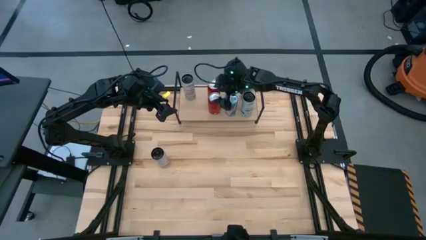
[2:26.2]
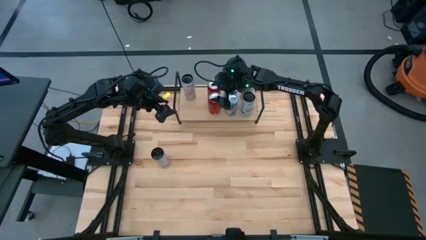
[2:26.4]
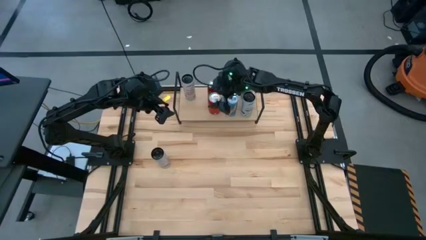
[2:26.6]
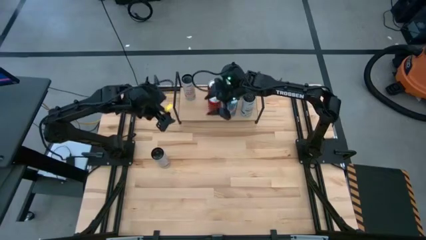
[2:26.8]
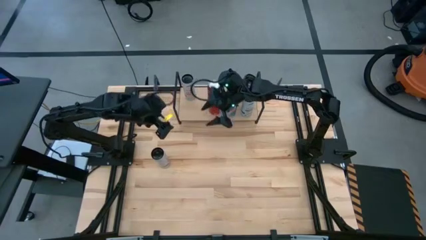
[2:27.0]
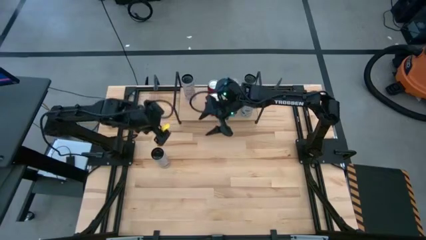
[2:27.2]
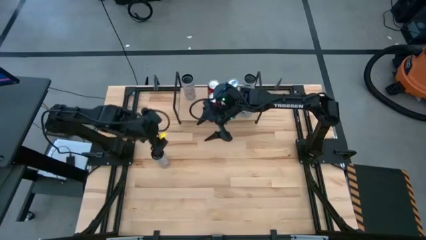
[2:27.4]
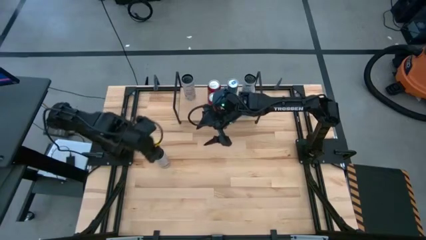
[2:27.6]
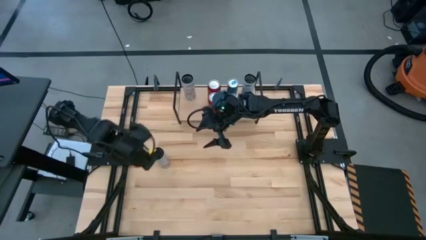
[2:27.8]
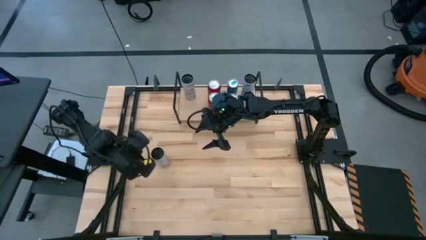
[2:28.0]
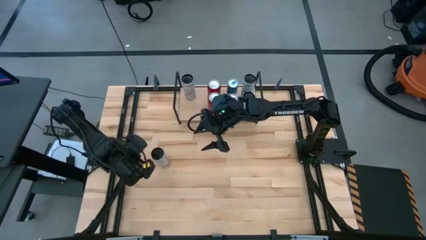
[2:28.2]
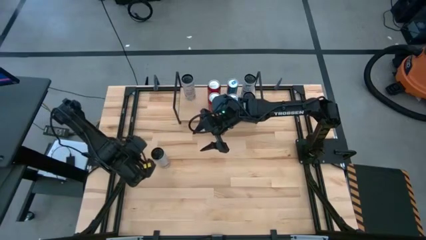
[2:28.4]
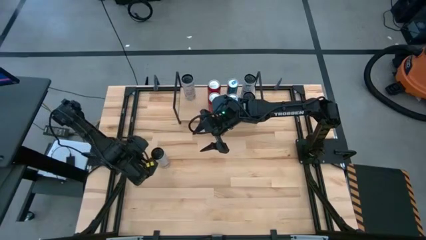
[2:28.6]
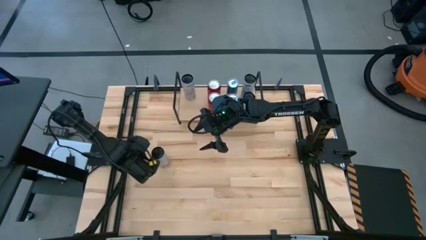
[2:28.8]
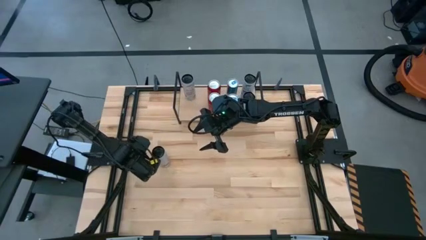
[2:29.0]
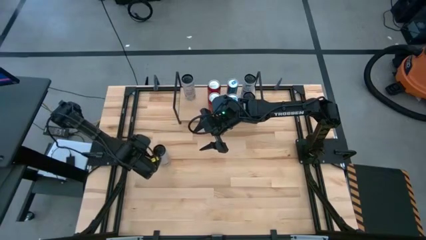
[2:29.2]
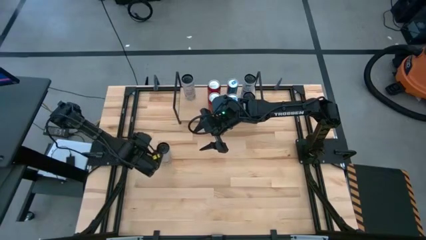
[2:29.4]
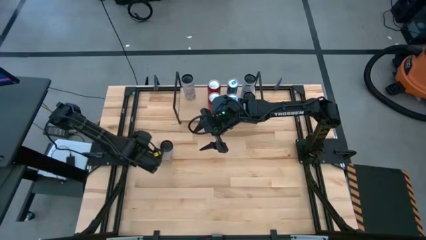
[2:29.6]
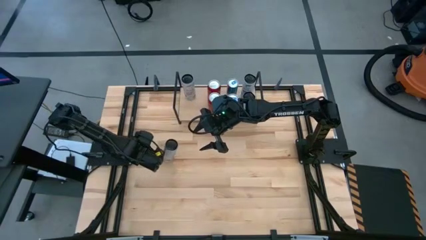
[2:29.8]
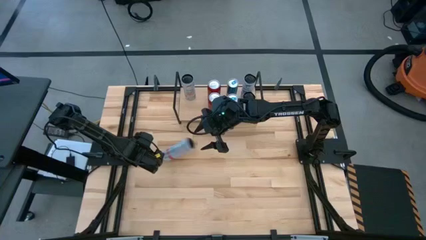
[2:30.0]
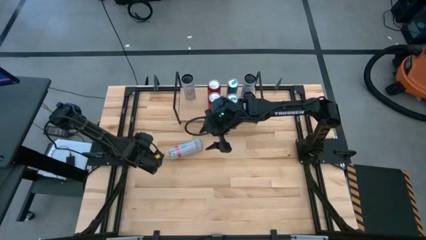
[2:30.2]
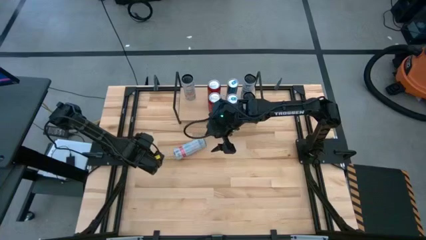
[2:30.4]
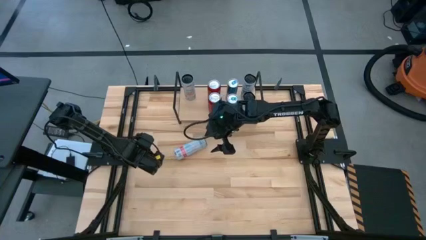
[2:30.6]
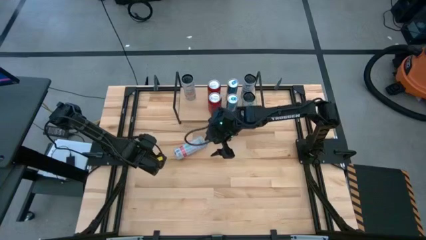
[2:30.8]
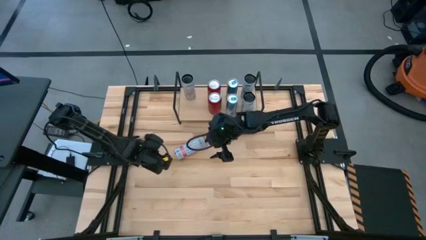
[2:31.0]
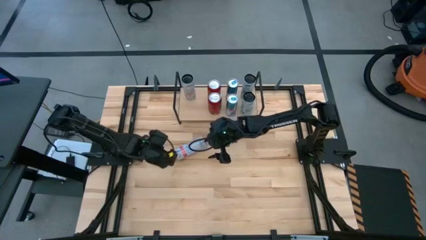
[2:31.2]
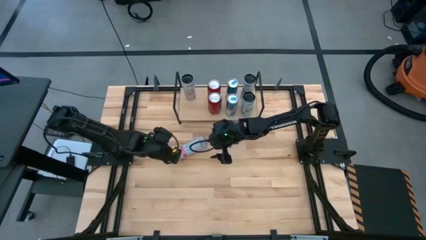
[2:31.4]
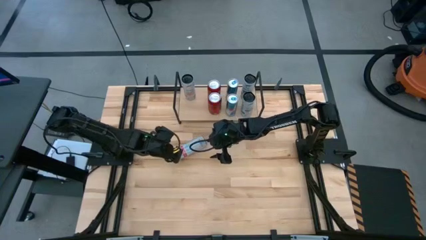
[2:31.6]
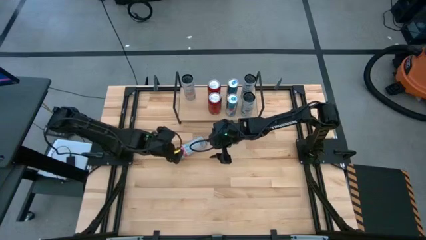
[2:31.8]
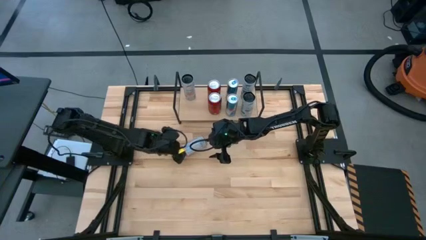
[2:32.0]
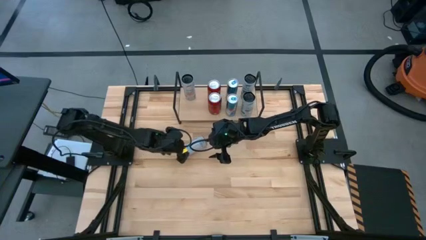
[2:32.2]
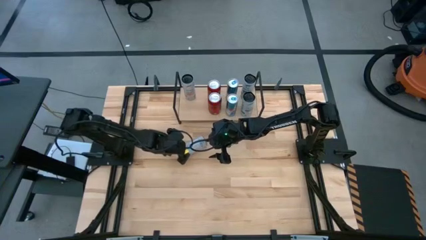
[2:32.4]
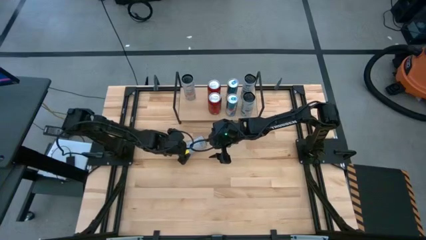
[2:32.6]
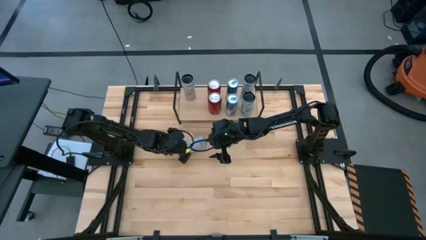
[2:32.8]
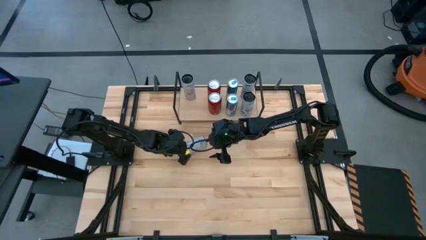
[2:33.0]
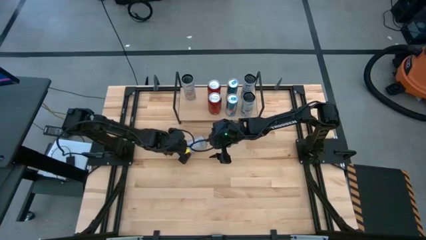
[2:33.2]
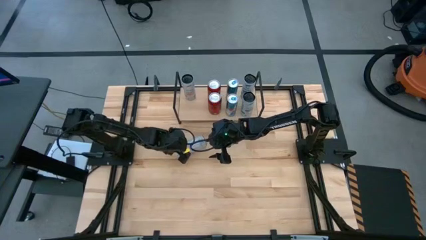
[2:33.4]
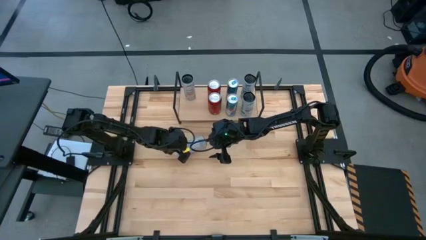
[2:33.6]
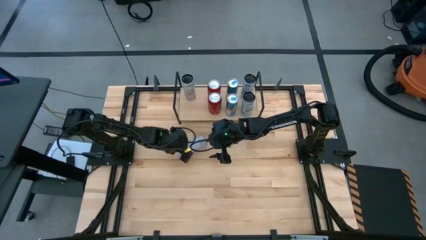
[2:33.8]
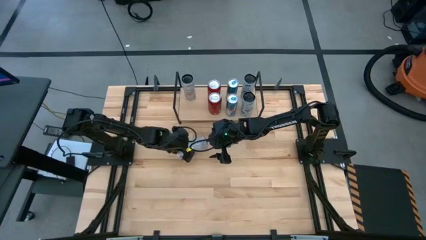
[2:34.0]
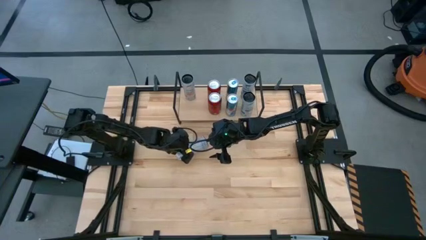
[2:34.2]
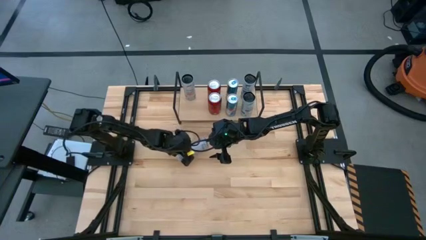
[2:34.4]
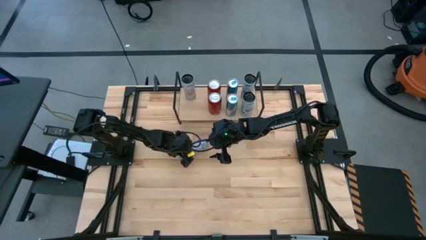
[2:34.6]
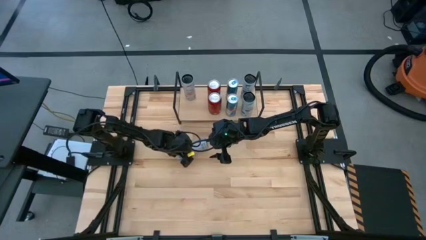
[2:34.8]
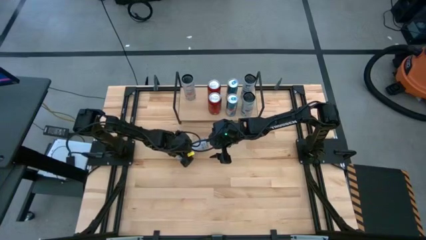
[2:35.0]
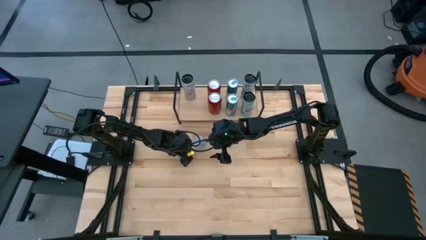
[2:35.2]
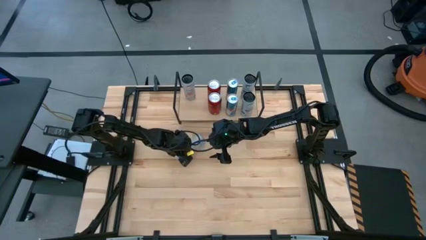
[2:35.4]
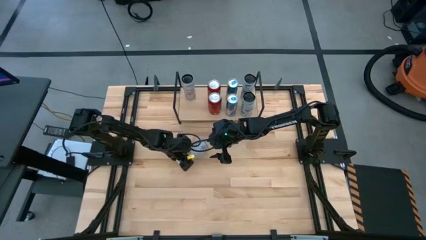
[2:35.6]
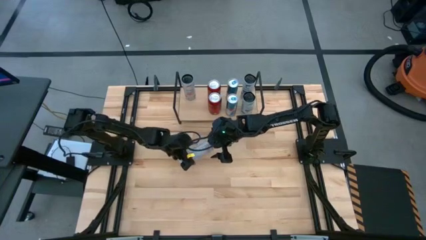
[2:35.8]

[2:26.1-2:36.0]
Task: Place canned beverage on shelf
Put the white pink soda can on the shelf aligned with the other white pink soda can

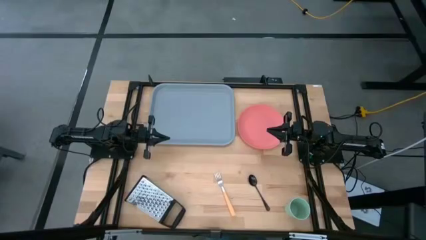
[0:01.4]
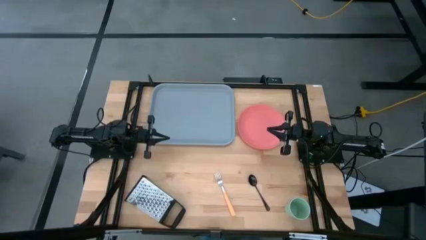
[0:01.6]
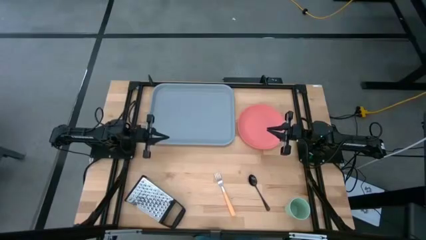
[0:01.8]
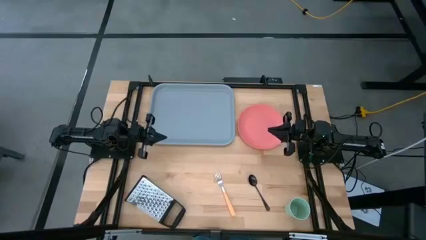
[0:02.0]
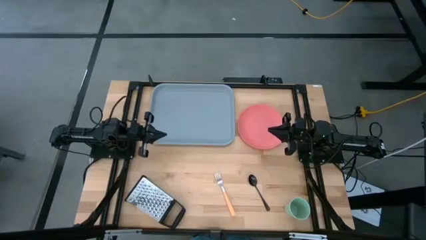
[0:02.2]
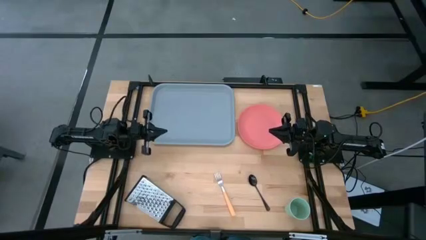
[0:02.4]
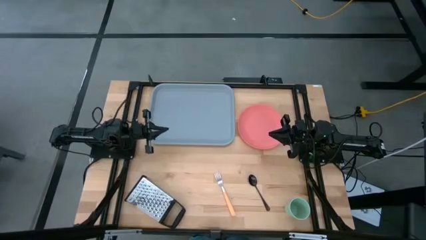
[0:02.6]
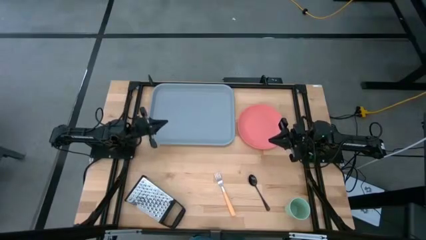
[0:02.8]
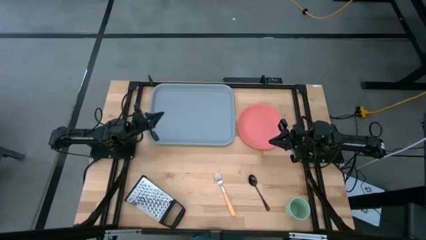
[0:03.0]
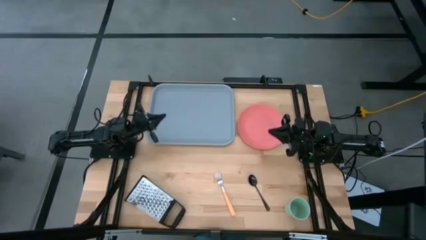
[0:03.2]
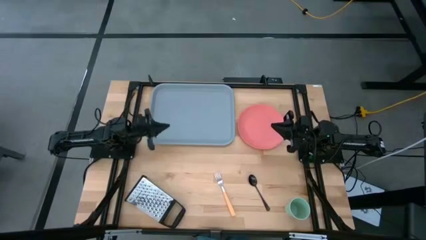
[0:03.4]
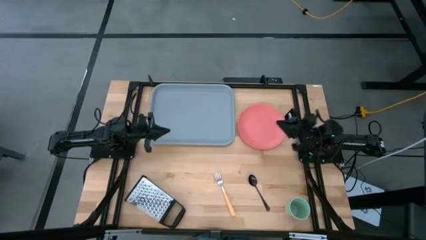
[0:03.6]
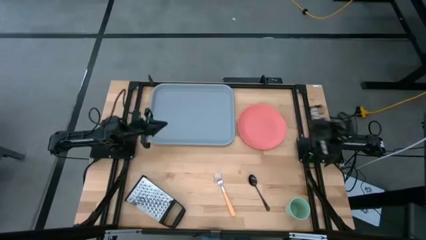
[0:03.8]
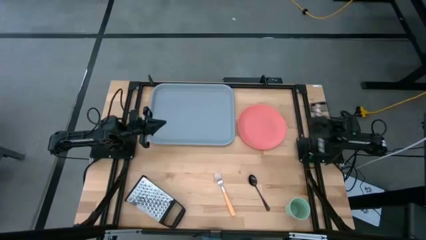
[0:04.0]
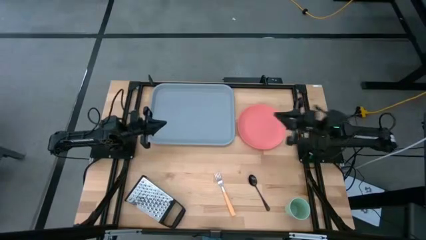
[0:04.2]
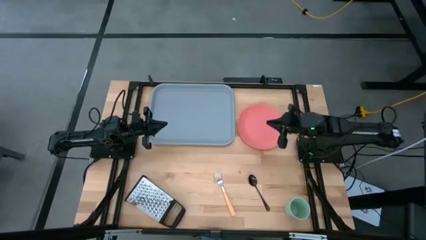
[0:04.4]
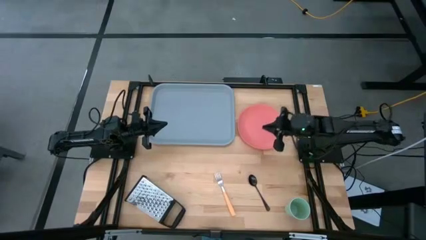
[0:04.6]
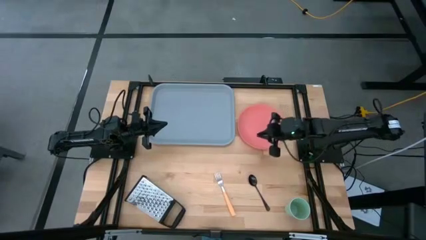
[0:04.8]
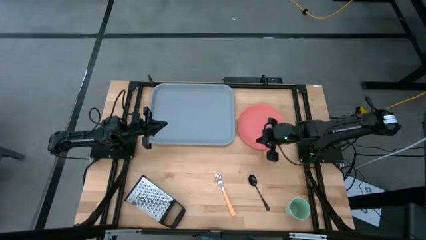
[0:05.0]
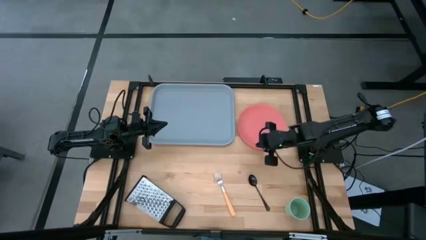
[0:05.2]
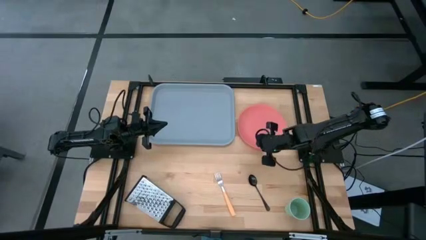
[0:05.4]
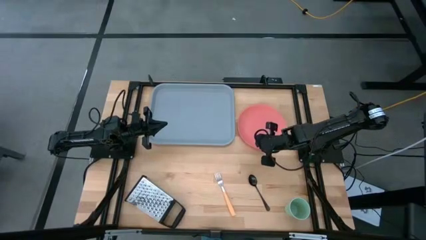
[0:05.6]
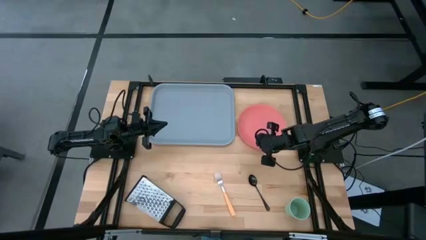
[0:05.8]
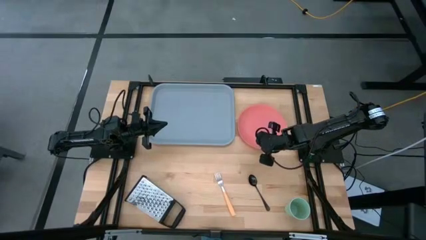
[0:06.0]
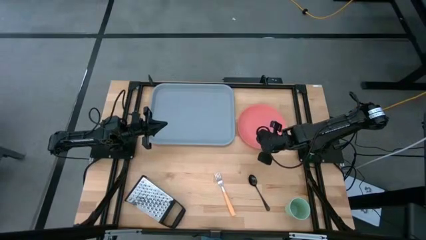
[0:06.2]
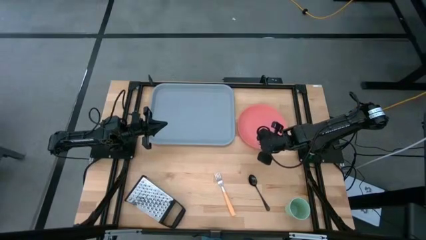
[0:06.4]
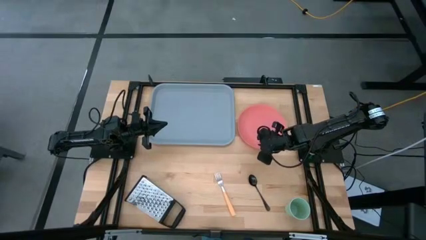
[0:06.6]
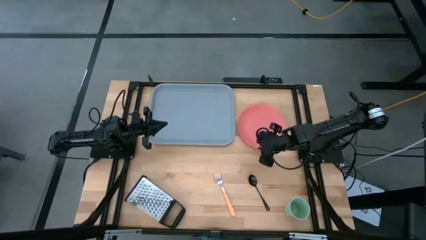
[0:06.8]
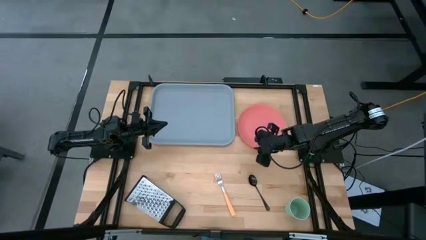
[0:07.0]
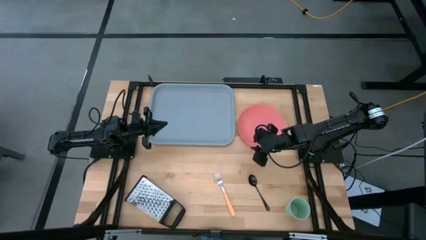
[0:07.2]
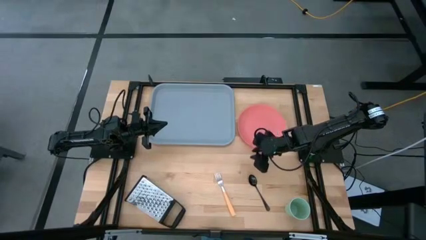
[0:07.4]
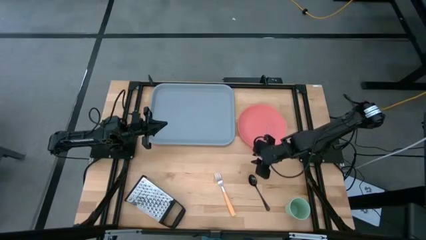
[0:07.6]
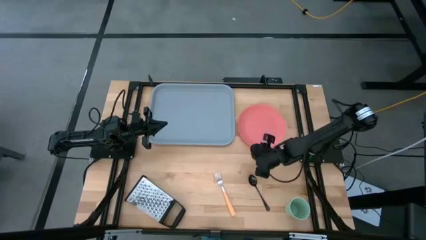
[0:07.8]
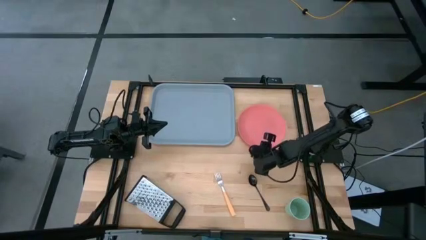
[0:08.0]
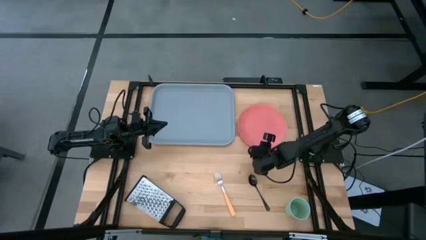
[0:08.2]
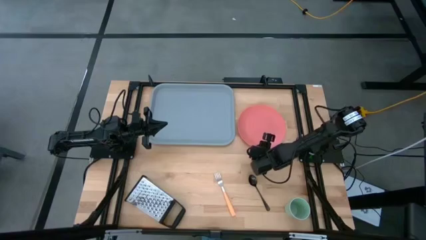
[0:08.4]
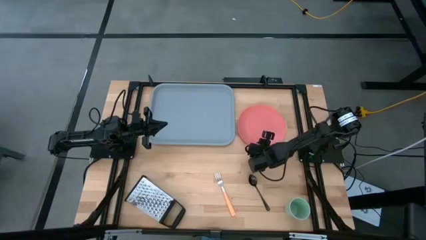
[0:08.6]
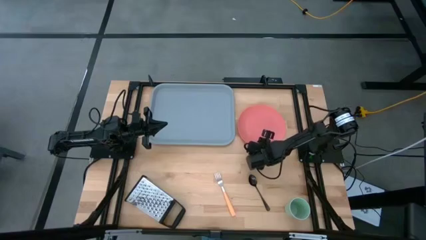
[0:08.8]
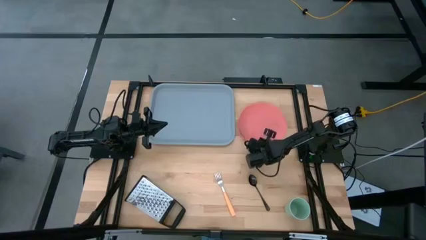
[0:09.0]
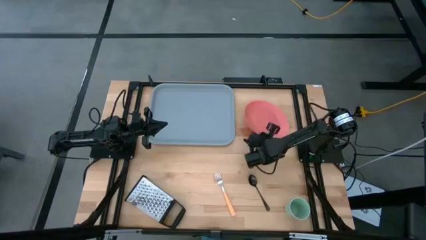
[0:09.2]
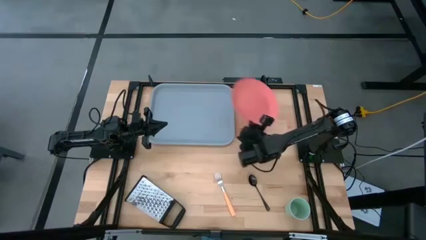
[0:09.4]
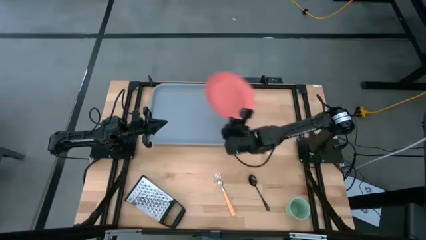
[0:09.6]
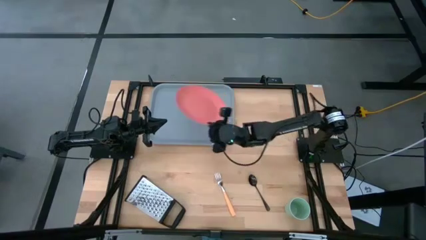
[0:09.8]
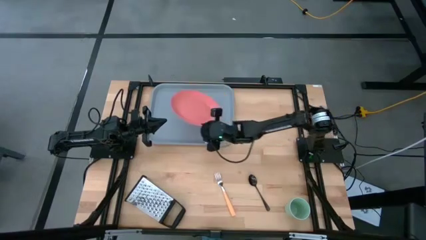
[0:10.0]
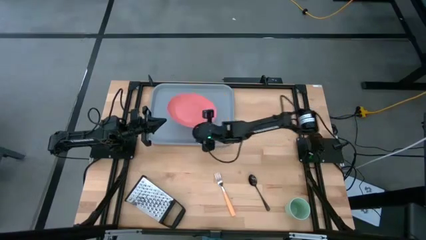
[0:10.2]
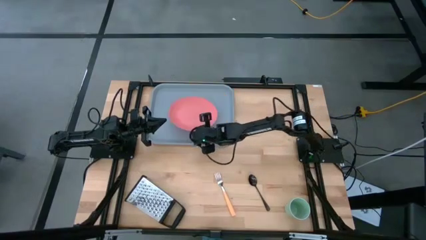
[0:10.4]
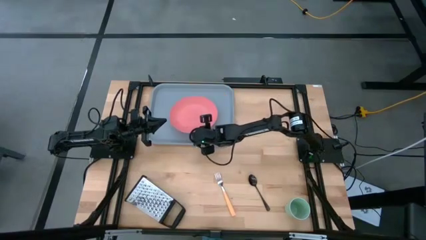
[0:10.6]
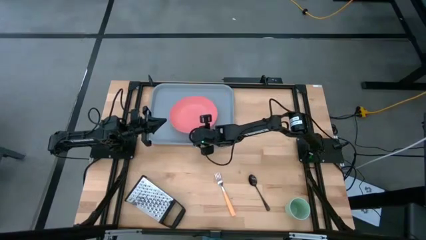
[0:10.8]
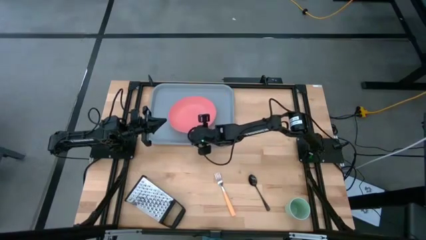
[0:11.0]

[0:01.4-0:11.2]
Task: Pick and place plate/cup/fork/spoon on tray
Put the pink plate on the gray serving tray
